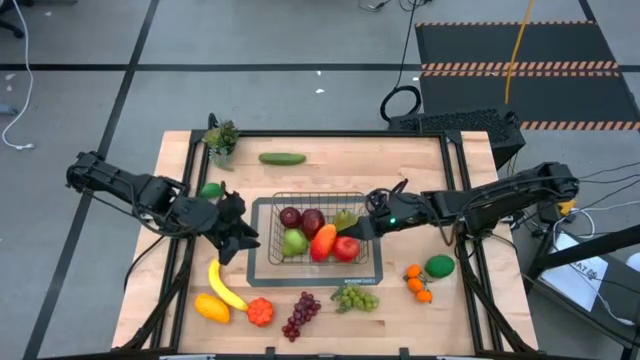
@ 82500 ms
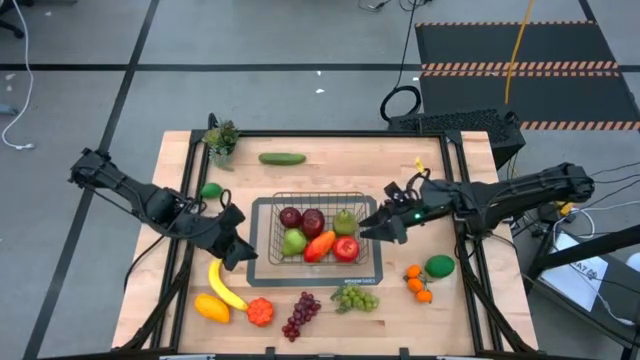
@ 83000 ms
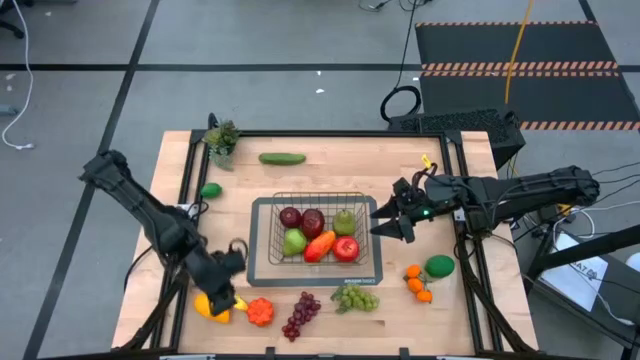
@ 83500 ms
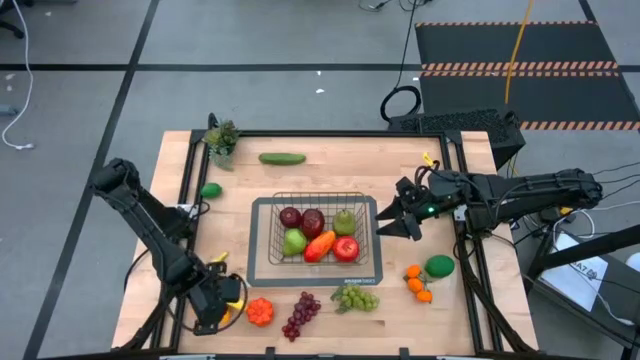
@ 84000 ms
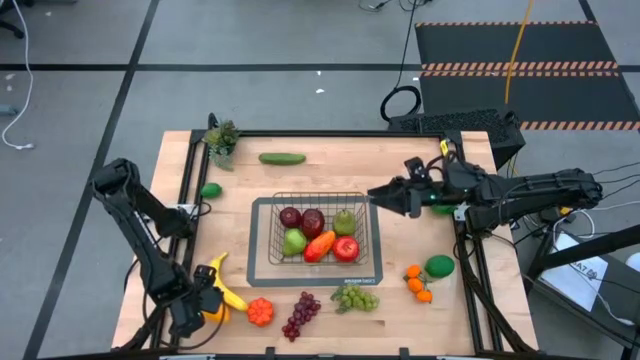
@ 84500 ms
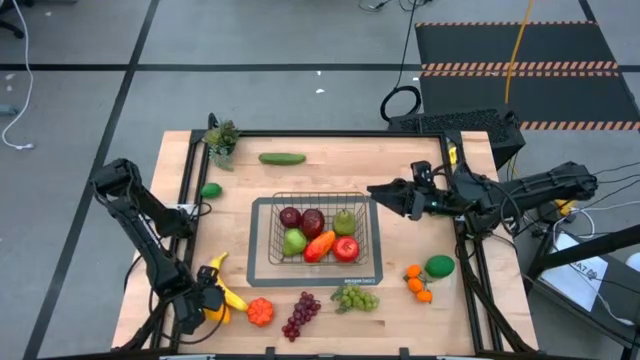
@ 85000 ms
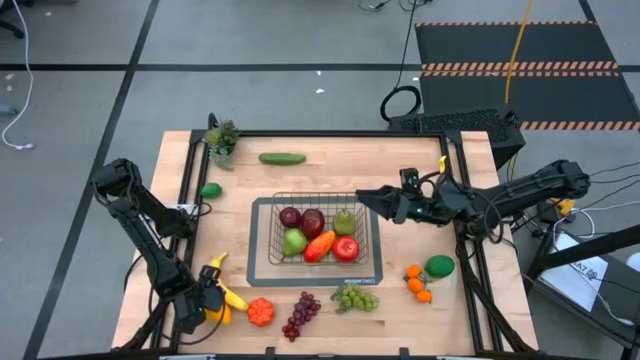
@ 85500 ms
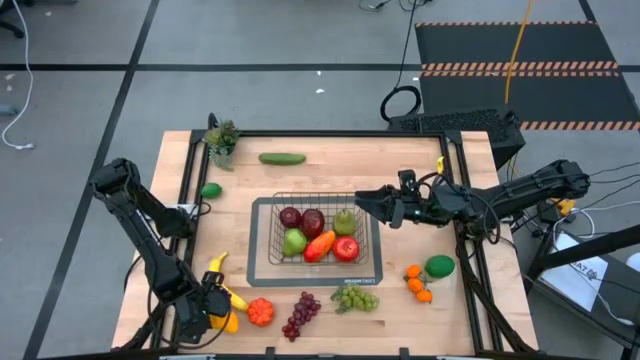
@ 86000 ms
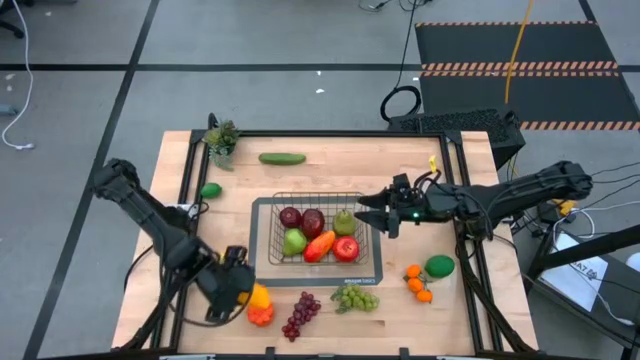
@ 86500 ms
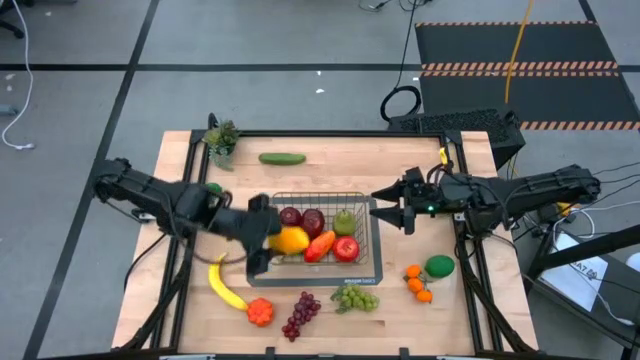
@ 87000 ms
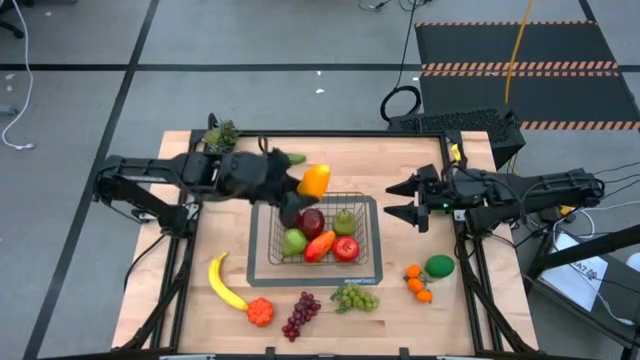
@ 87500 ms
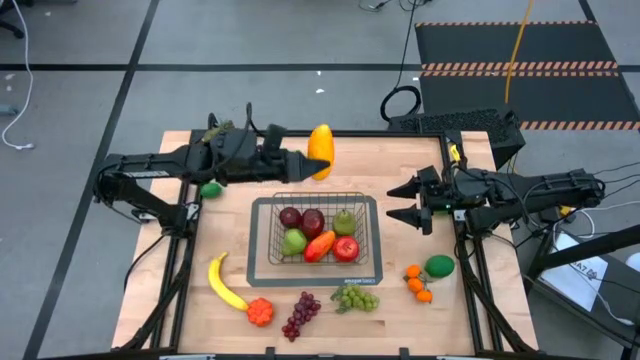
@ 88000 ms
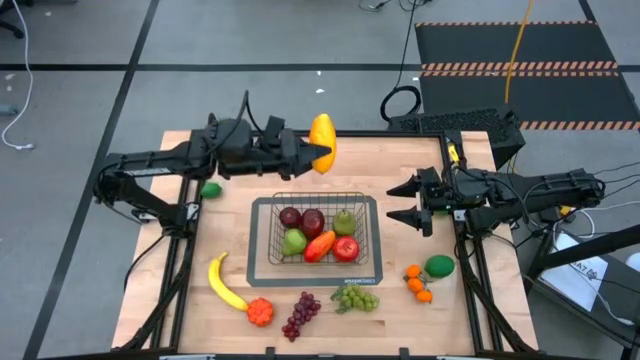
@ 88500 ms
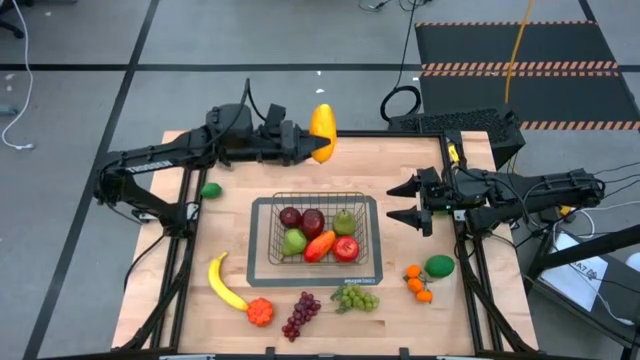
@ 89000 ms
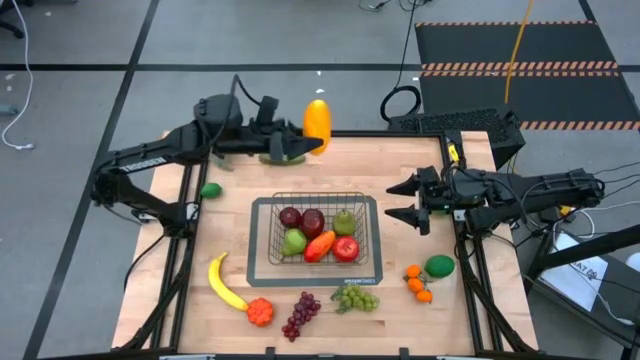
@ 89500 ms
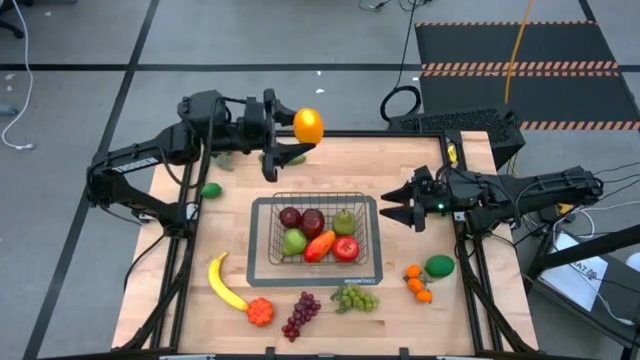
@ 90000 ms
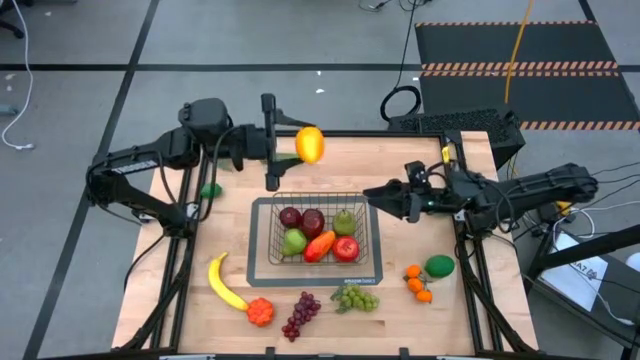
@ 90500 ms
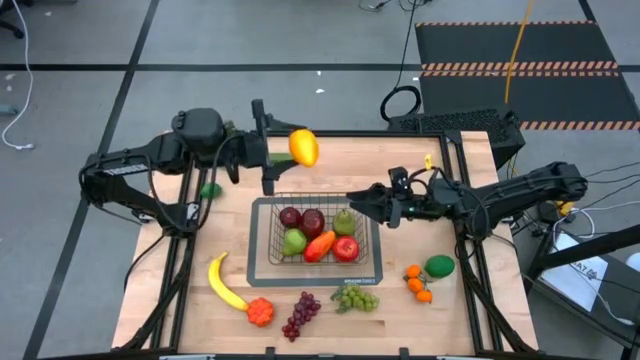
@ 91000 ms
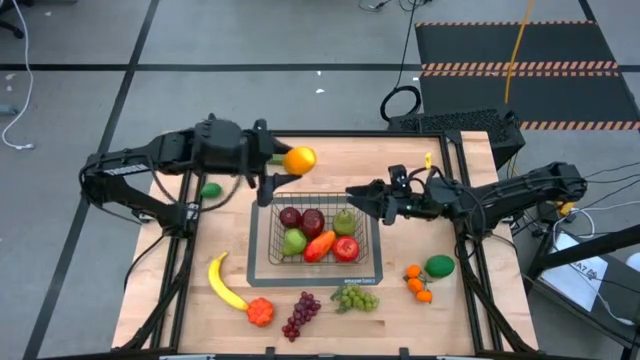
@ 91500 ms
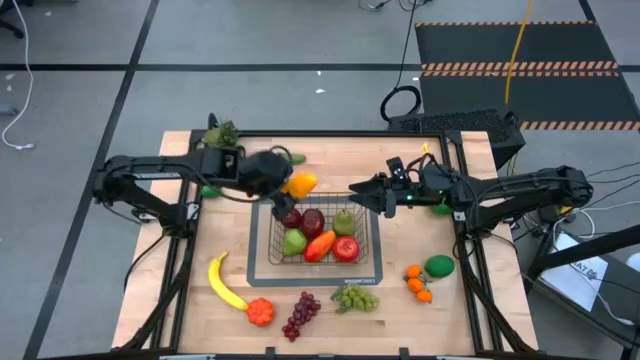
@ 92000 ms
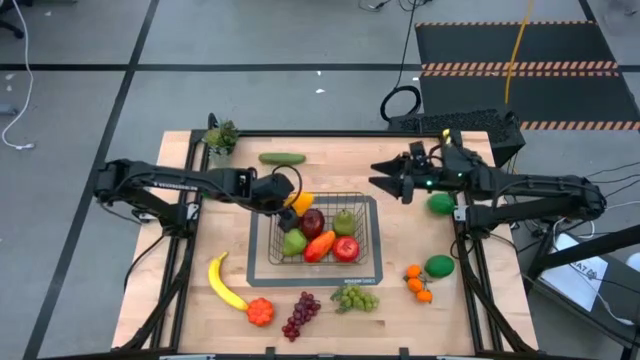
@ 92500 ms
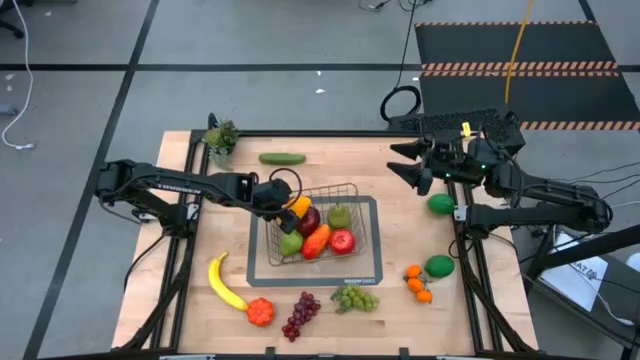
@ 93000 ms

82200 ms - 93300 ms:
Task: Build produce basket
Put the mango into the gold wire basket

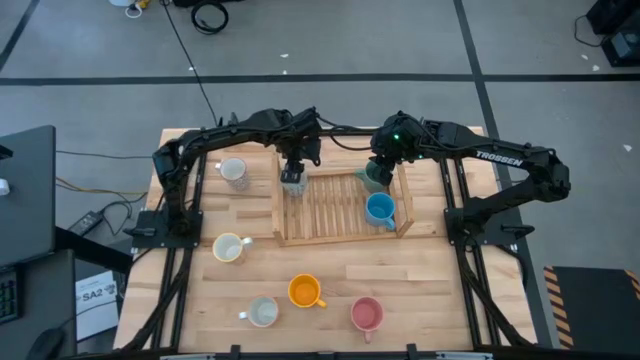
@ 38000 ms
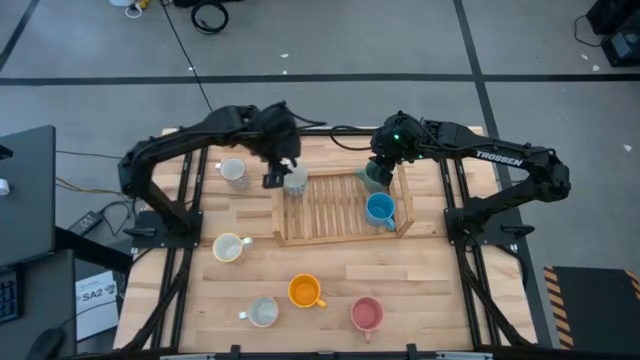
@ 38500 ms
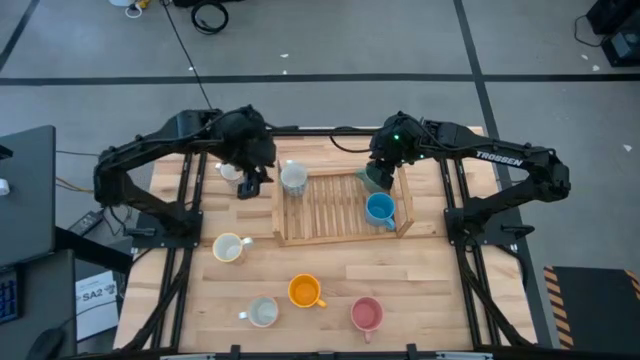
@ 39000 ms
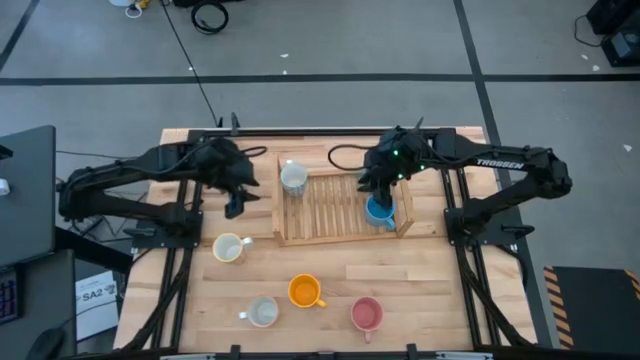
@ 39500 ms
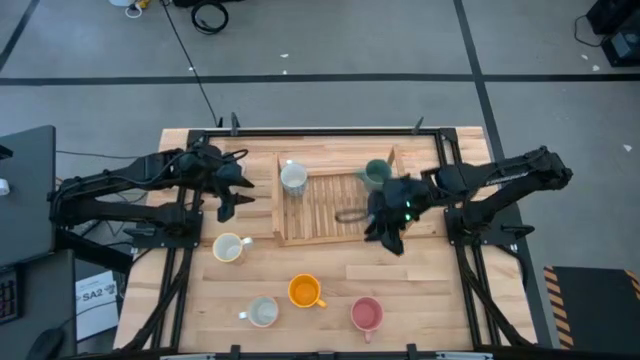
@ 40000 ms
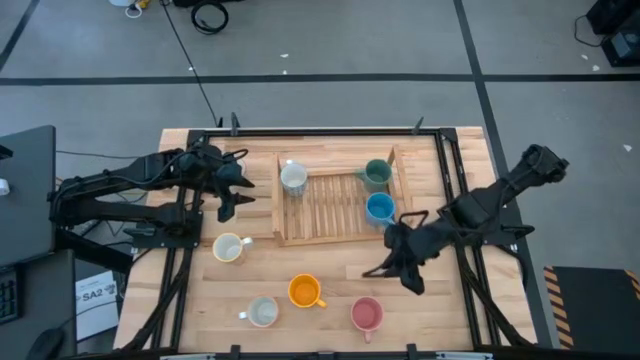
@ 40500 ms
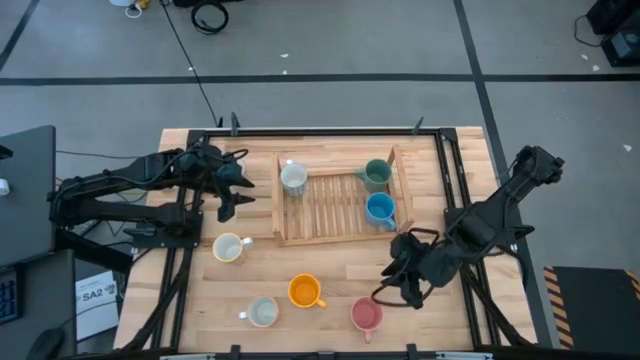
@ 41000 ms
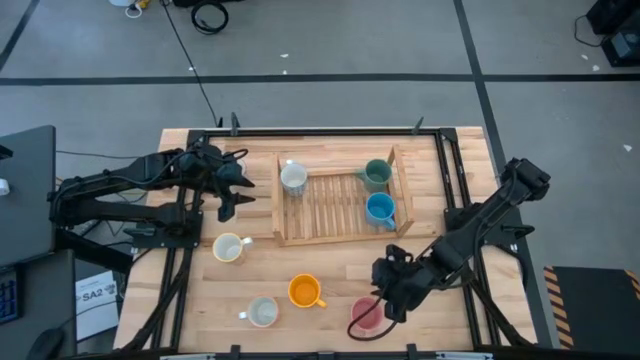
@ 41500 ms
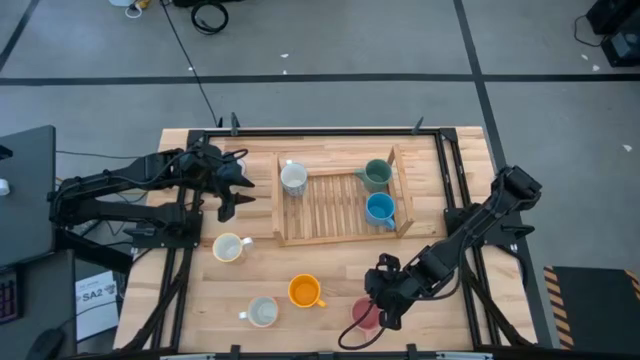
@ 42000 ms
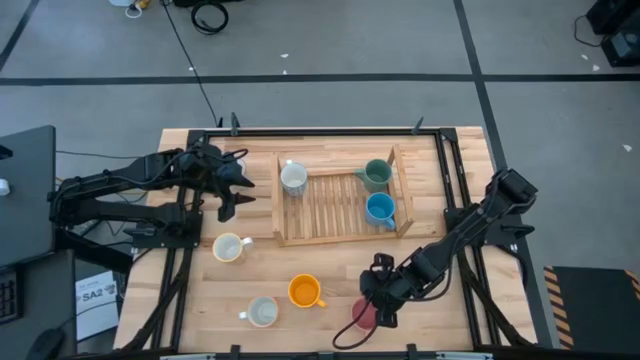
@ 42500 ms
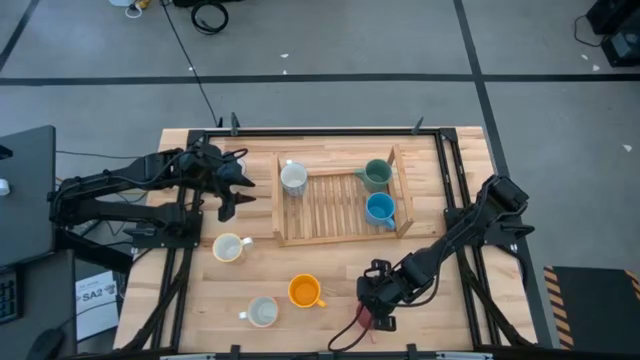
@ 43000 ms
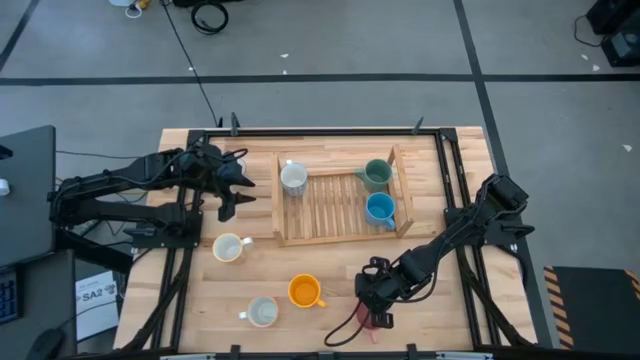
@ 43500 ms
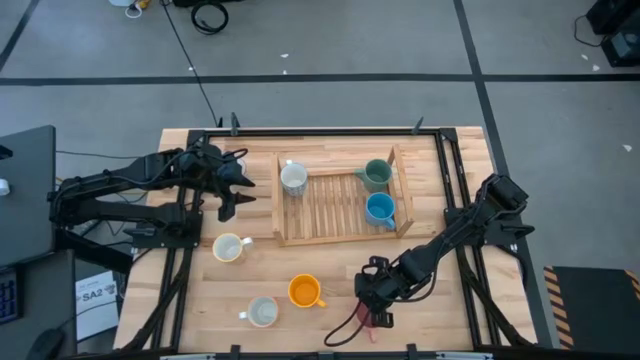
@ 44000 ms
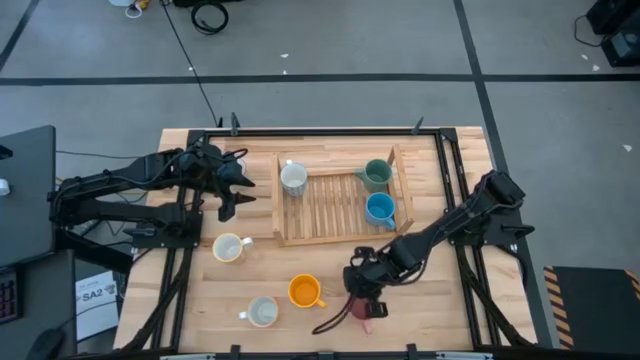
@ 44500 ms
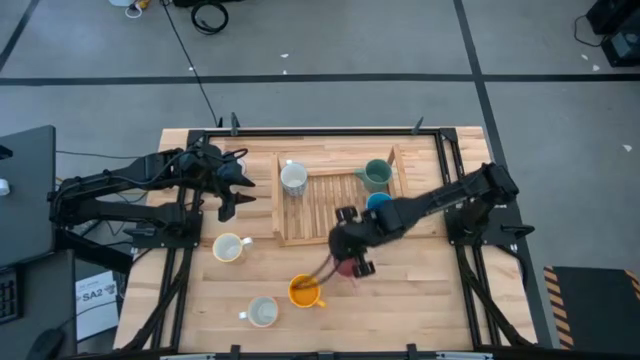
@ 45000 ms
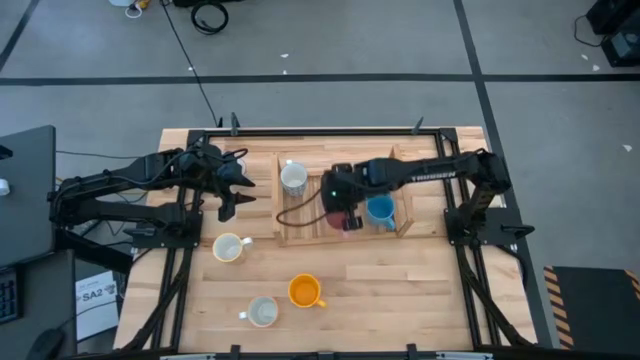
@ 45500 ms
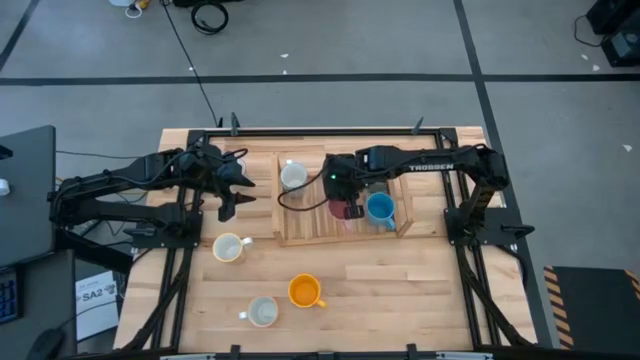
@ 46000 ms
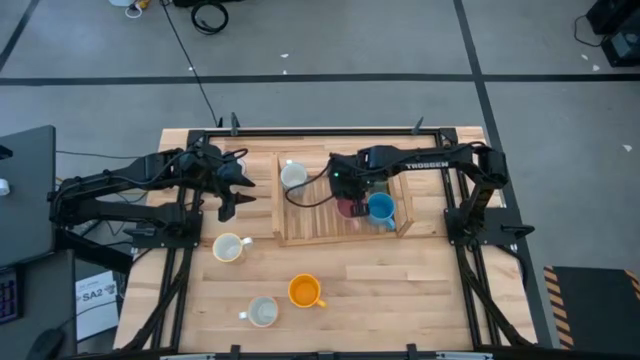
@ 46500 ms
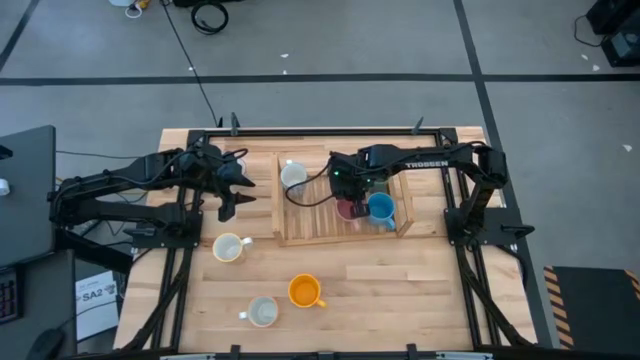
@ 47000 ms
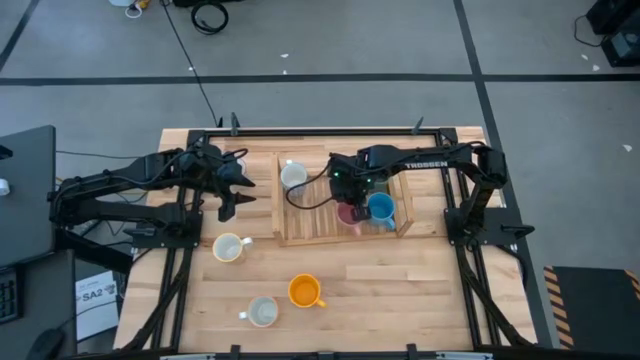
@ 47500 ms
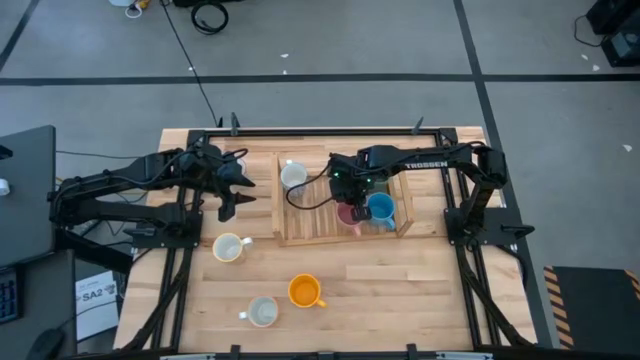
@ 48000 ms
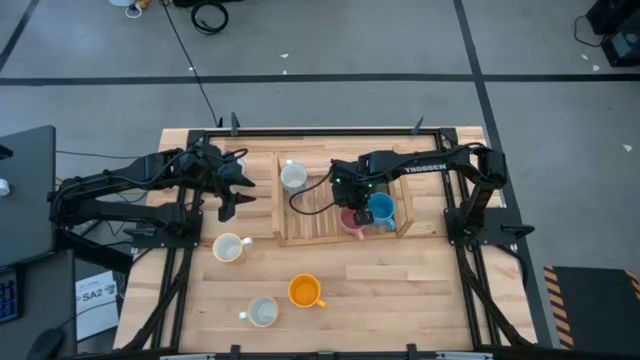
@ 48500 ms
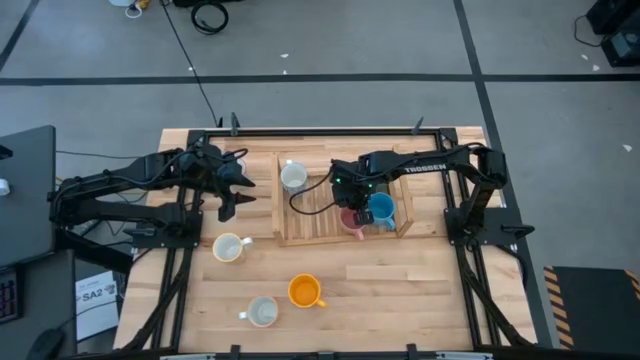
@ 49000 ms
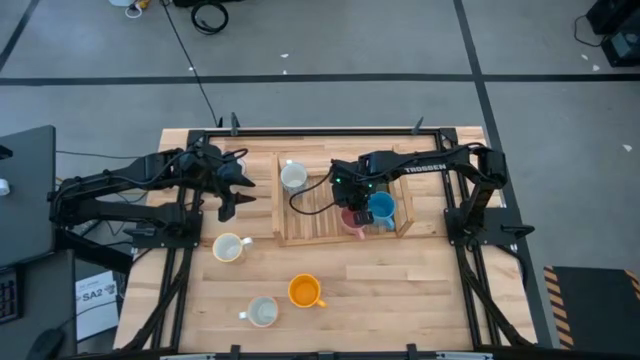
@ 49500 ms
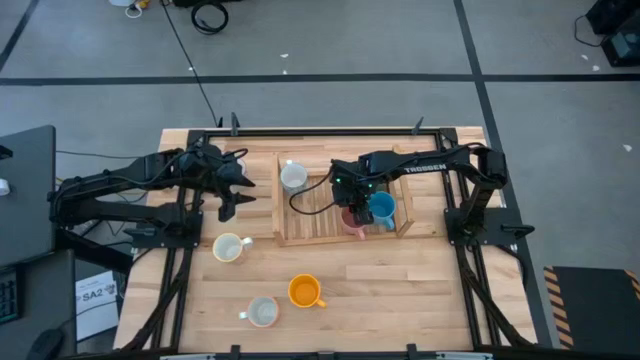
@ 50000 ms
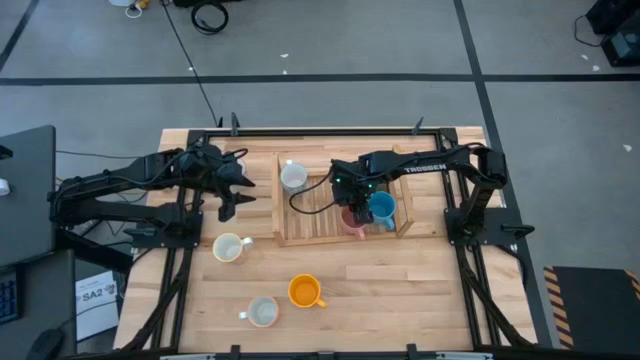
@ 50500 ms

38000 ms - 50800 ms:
Task: Place coffee mugs
Put the pink cup on the shelf
